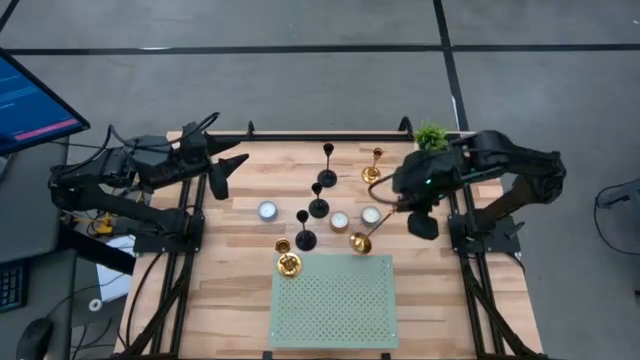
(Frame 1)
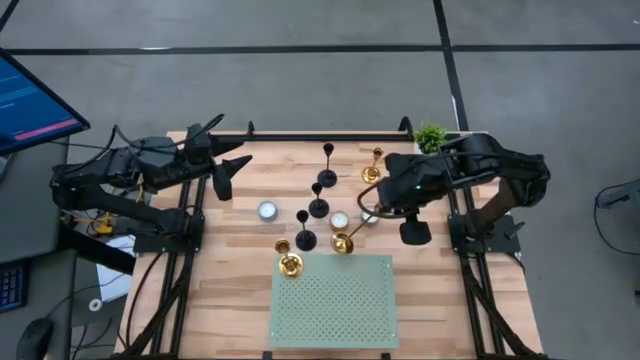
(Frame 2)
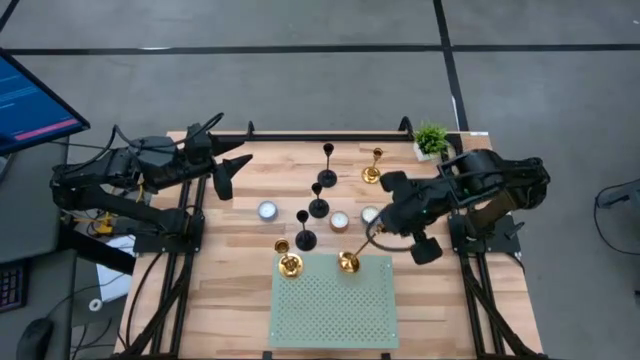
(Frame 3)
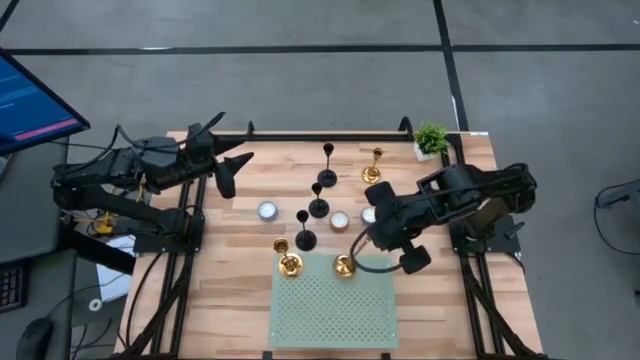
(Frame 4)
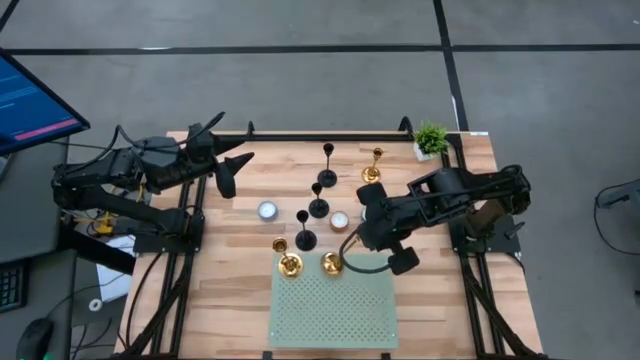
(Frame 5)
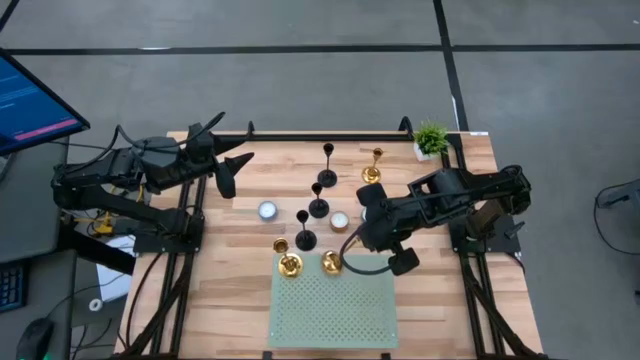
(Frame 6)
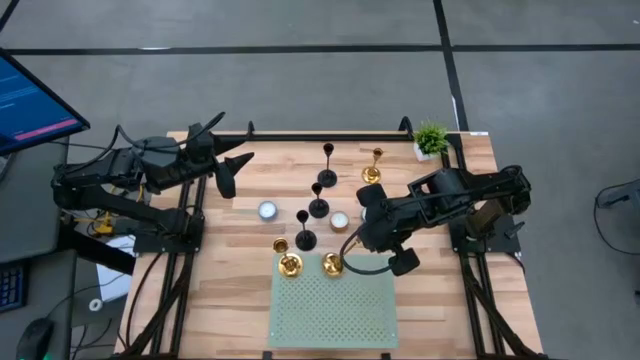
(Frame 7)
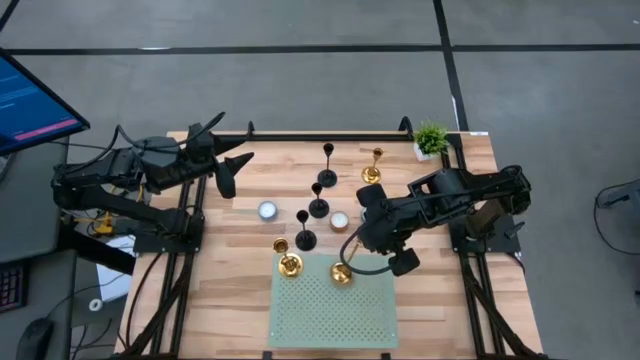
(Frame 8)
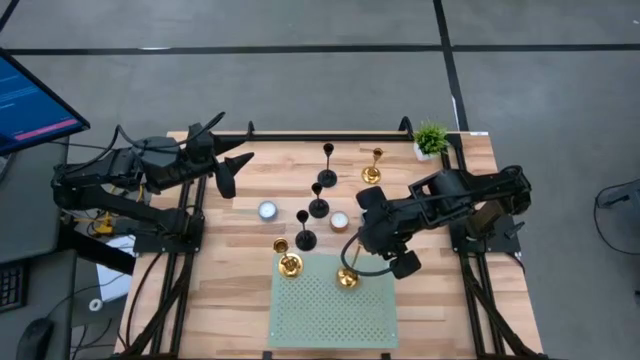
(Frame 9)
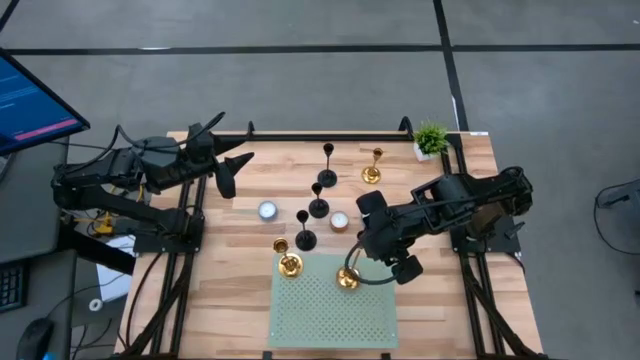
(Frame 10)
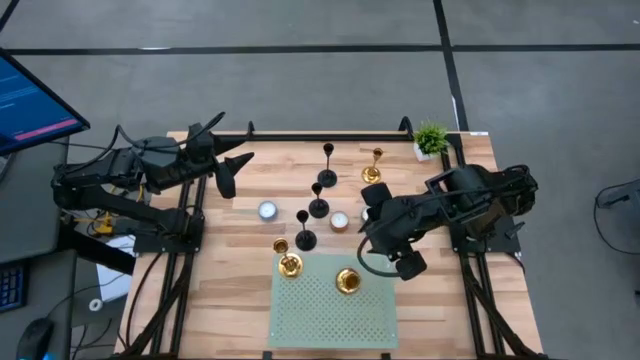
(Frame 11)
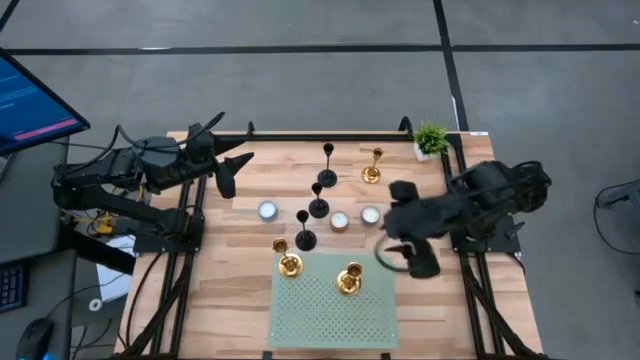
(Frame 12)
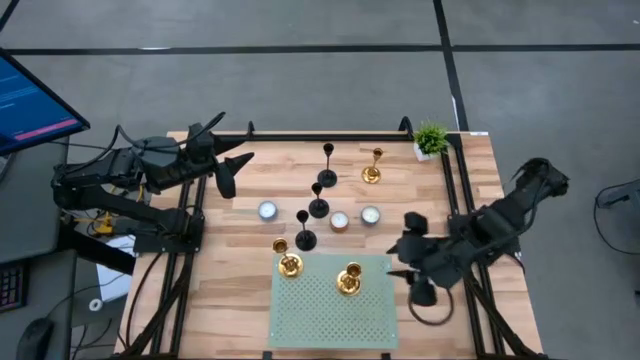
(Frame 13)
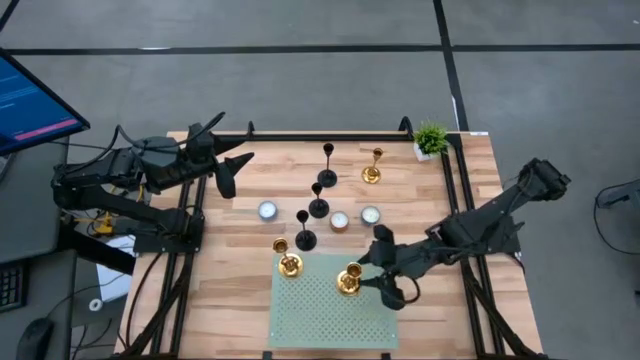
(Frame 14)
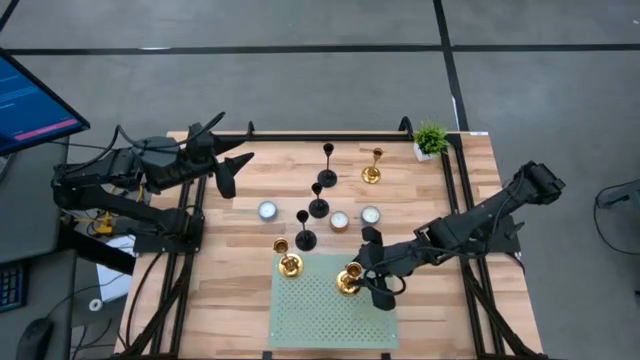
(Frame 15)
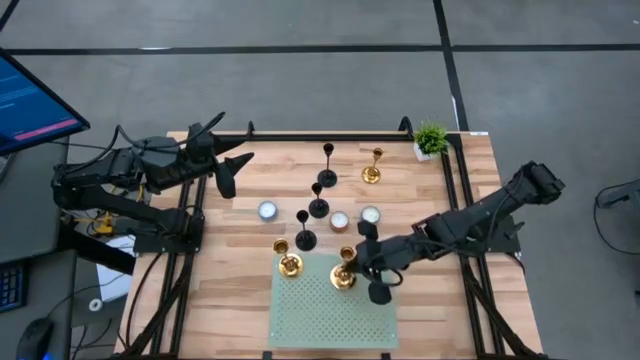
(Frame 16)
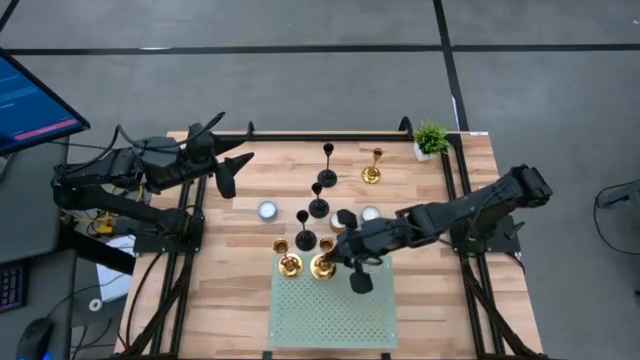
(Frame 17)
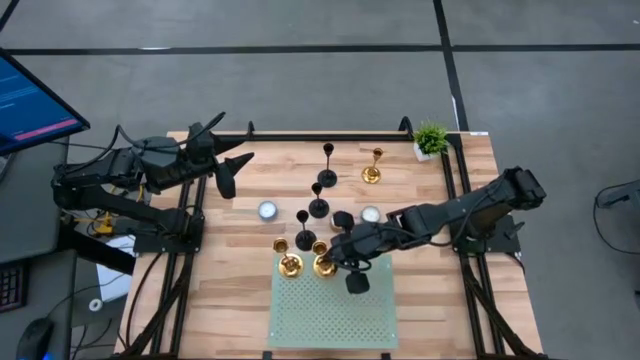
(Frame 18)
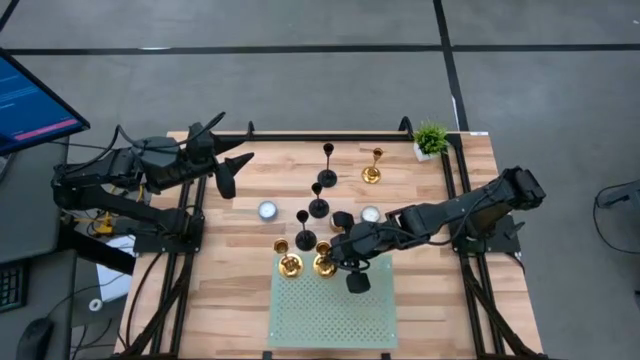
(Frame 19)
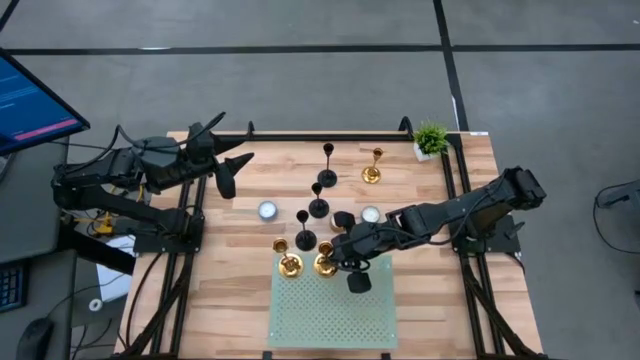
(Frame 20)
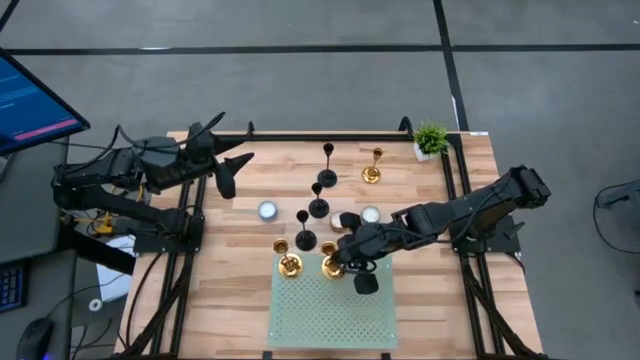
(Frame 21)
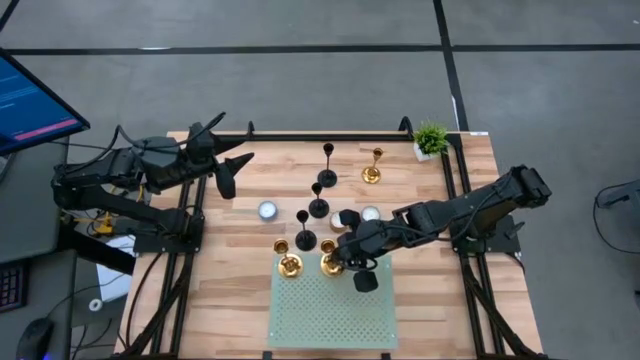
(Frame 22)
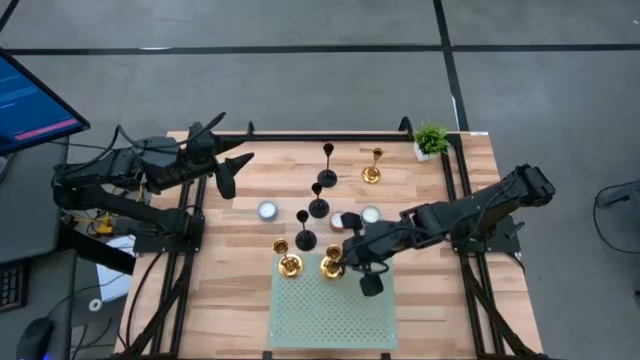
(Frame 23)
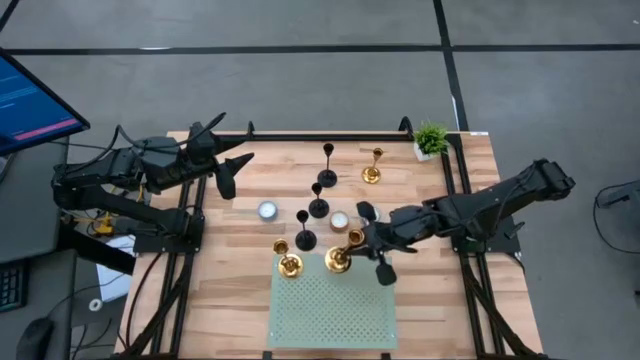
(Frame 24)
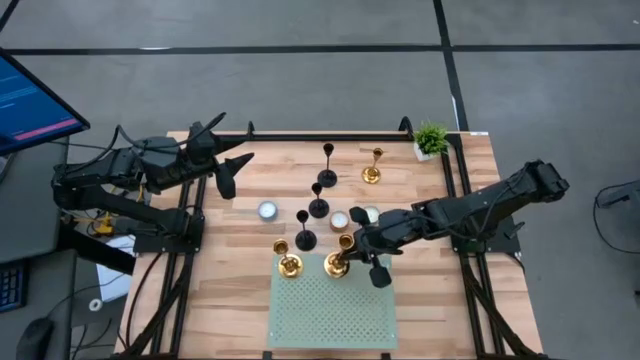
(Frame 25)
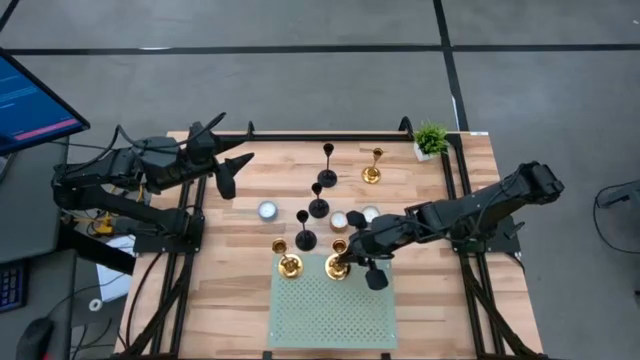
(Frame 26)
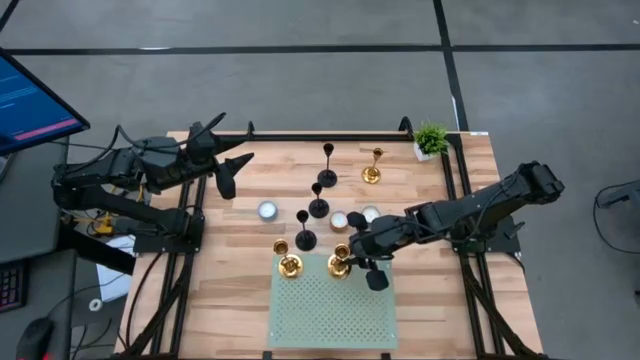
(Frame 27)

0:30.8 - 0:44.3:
Task: Pick & Place candle stick holders
Put the right gold candle holder on the shelf aligned with the other gold candle holder

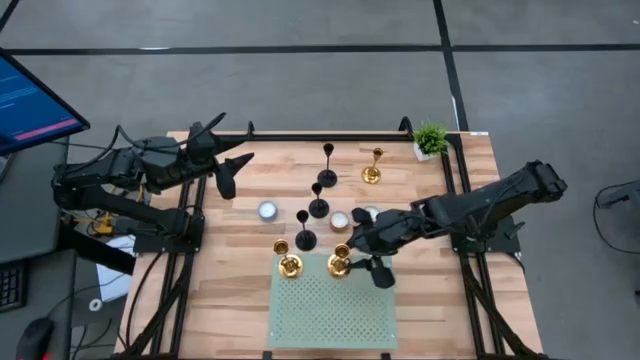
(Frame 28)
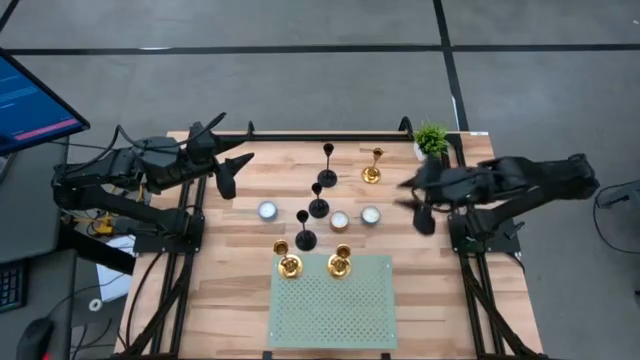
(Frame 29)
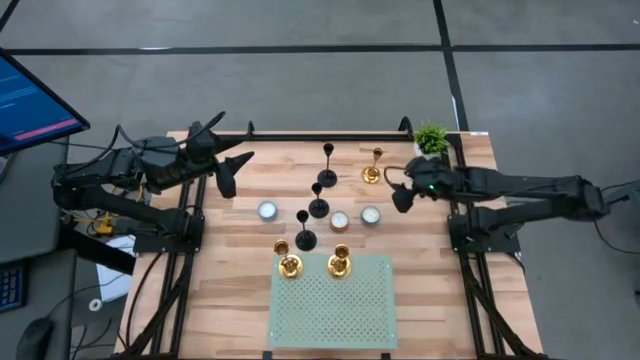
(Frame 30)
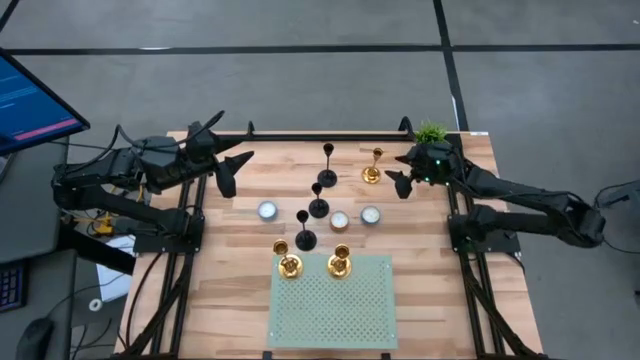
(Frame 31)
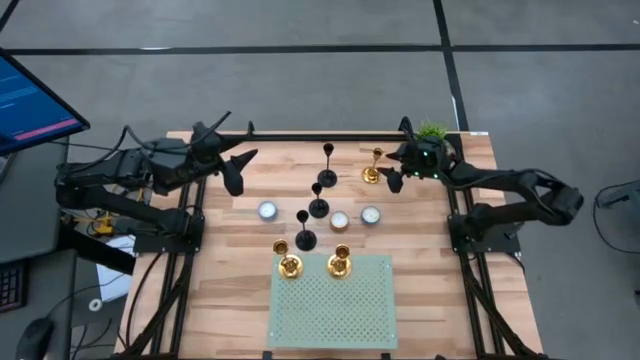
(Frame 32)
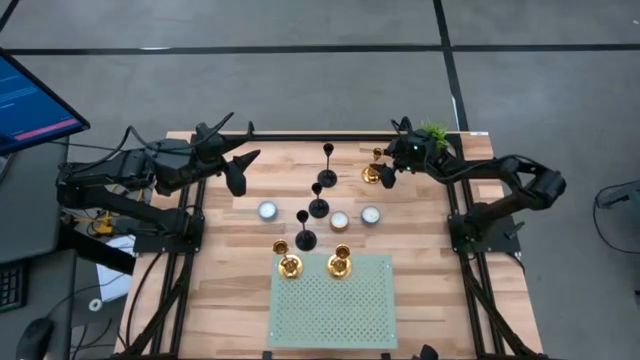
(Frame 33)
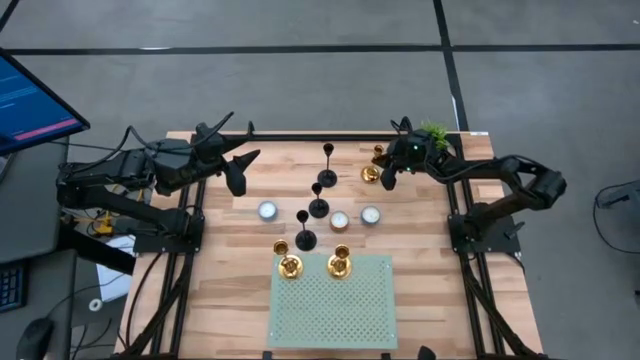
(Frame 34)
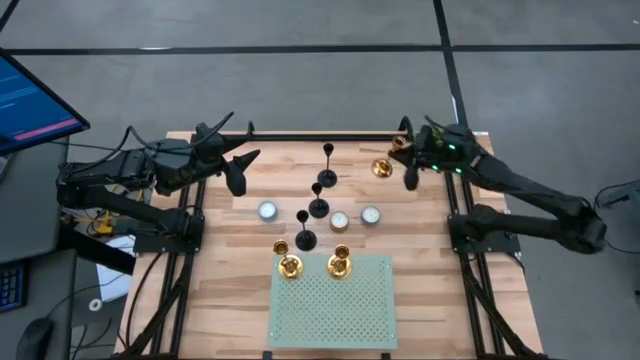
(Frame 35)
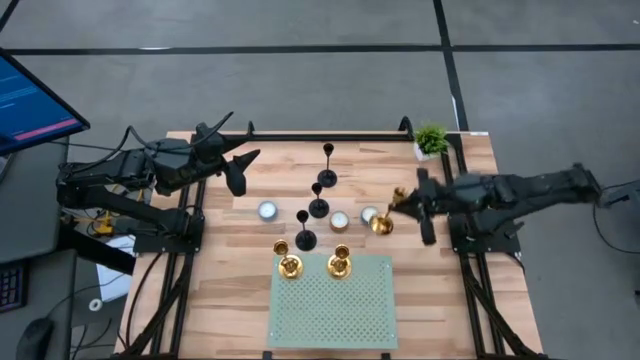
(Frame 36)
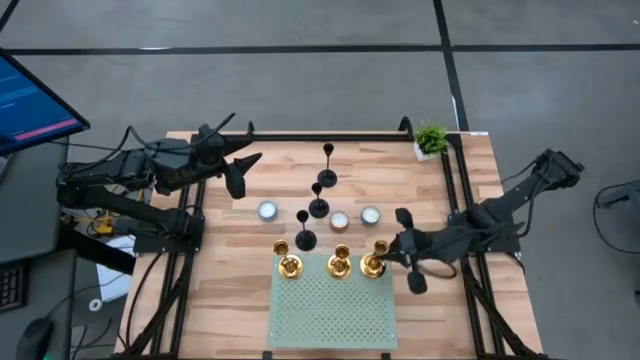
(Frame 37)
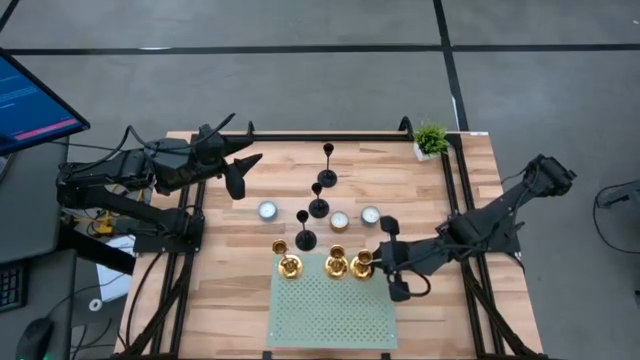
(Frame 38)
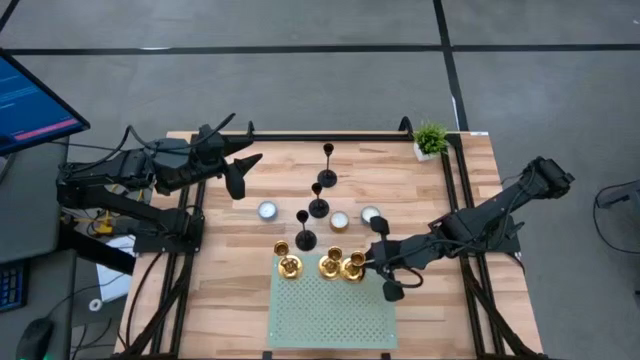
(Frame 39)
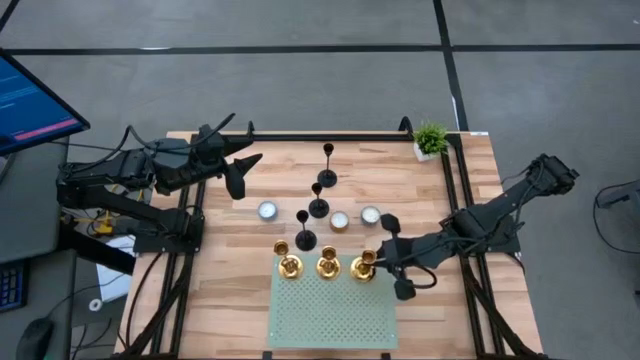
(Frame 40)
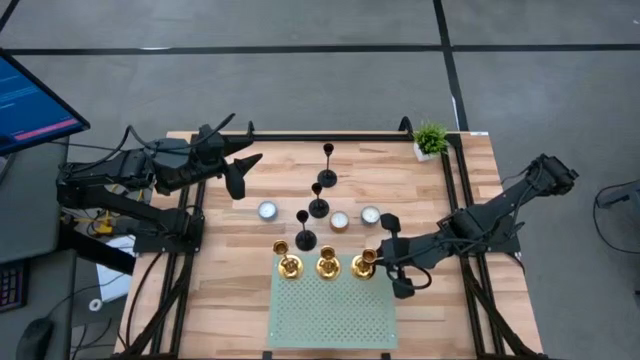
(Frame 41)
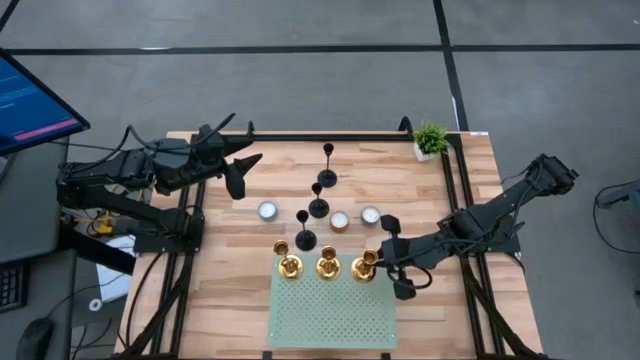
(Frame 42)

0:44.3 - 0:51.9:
Put the gold candle holder on the shelf aligned with the other gold candle holders

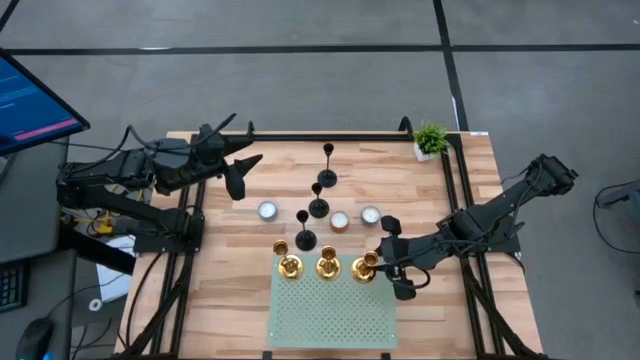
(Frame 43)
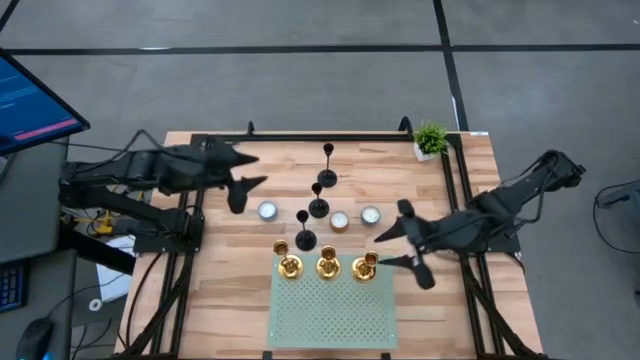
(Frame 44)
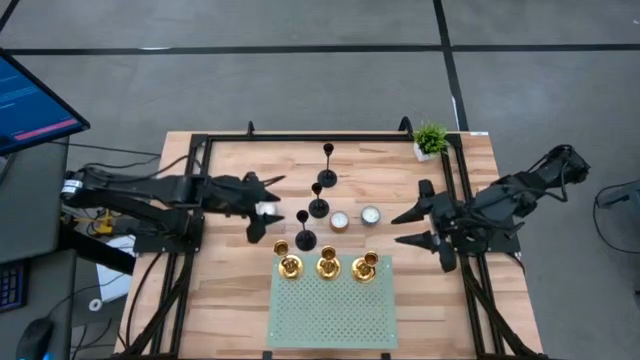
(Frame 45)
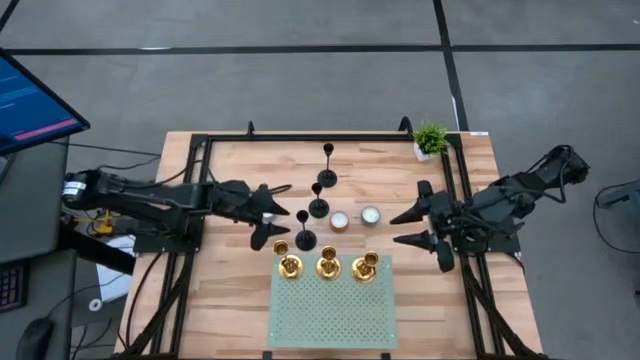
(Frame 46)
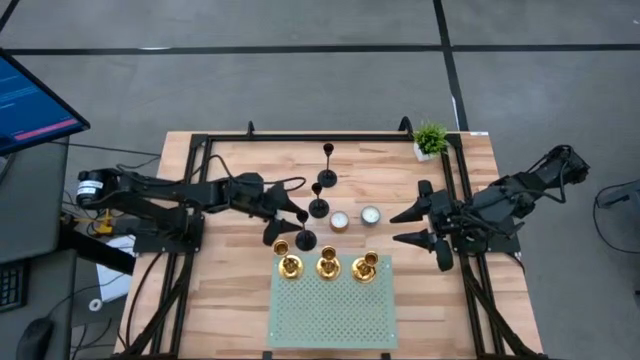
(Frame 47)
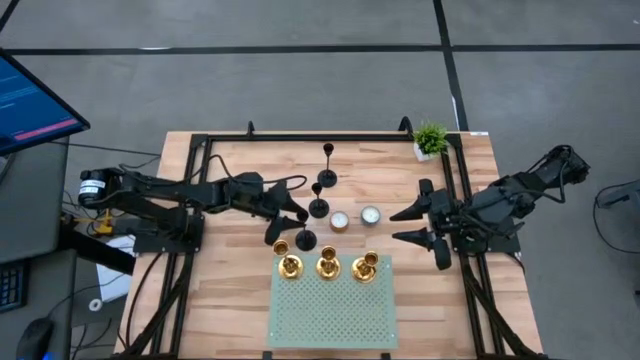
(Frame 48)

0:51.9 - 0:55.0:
Put the bottom black candle holder on the shelf
